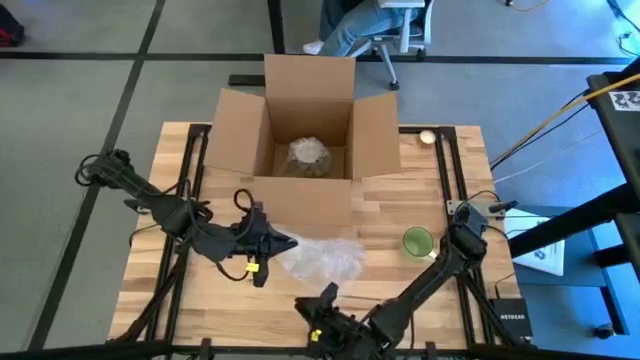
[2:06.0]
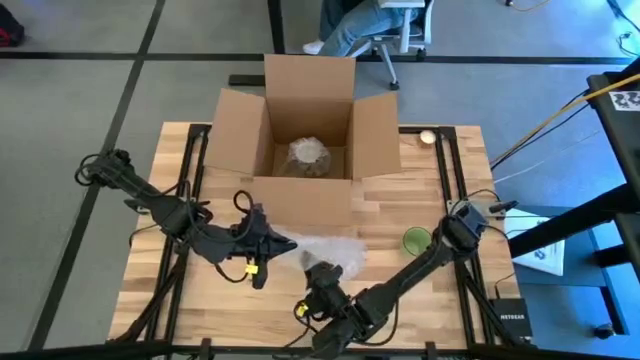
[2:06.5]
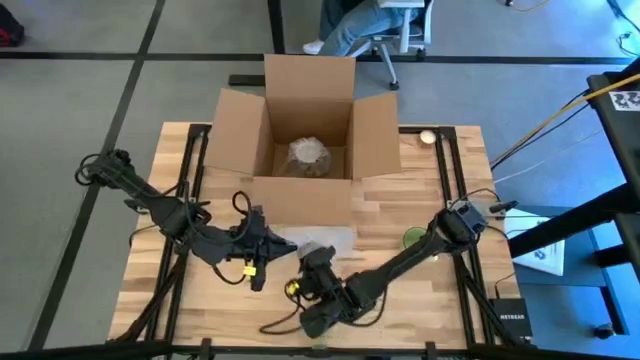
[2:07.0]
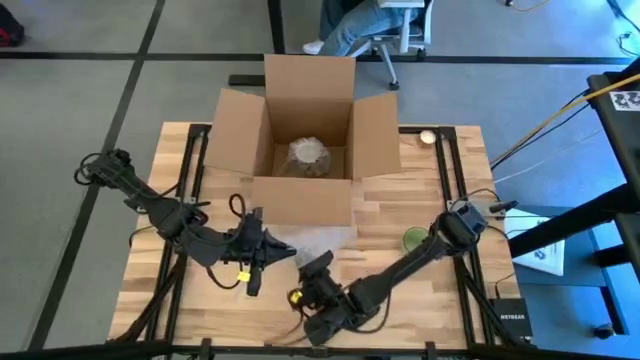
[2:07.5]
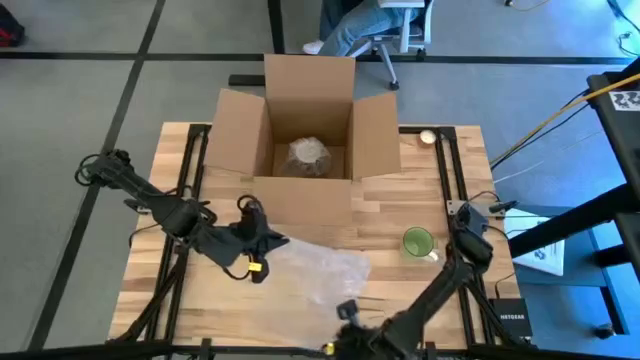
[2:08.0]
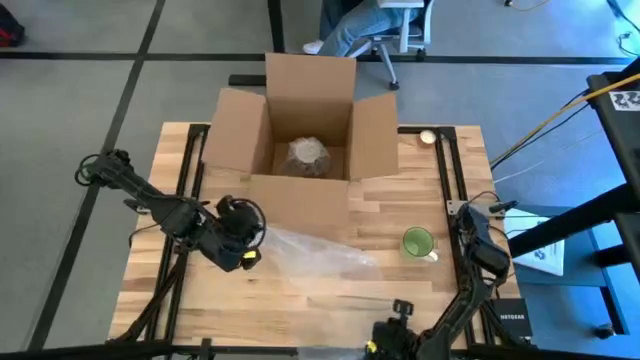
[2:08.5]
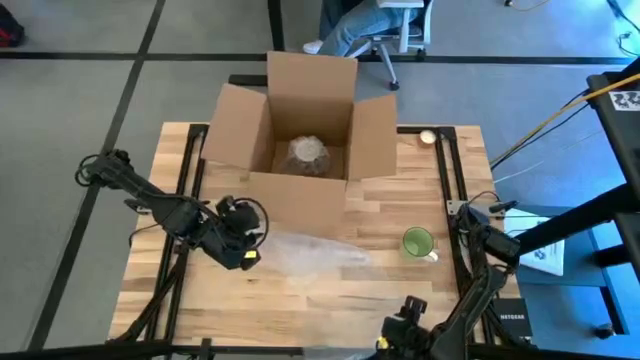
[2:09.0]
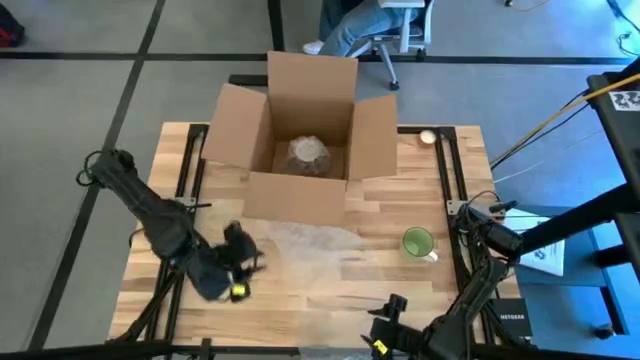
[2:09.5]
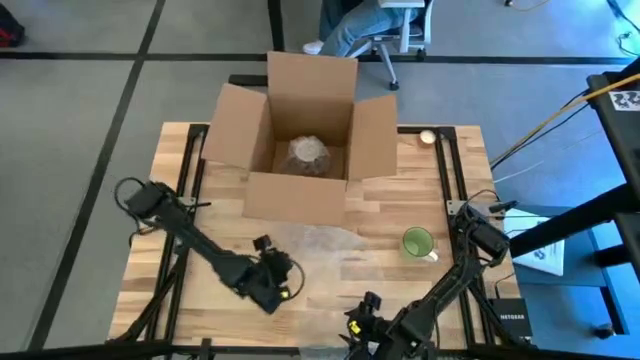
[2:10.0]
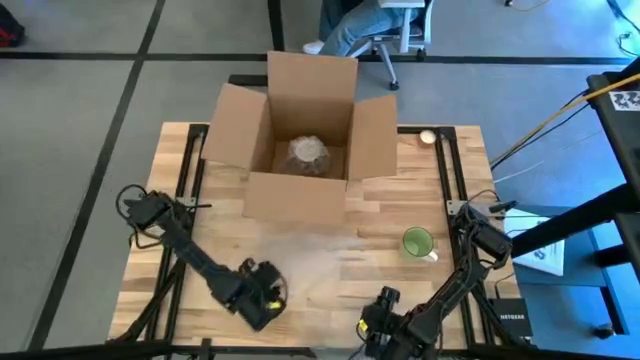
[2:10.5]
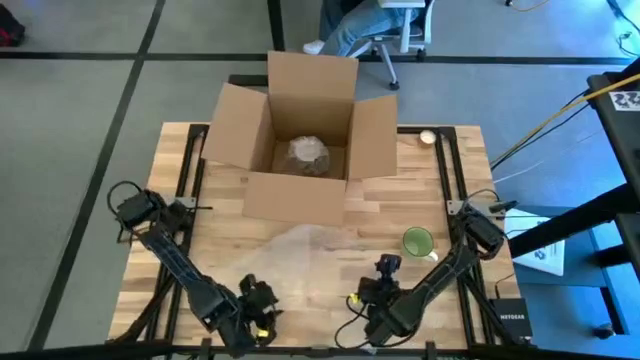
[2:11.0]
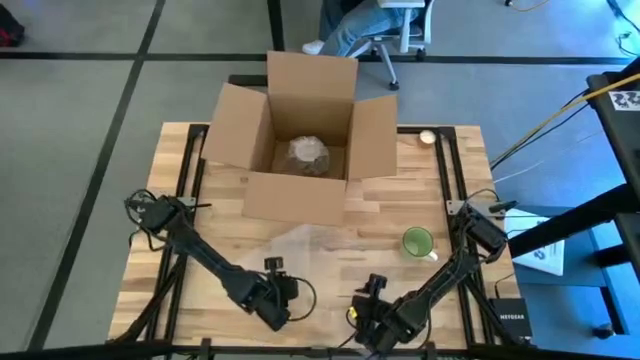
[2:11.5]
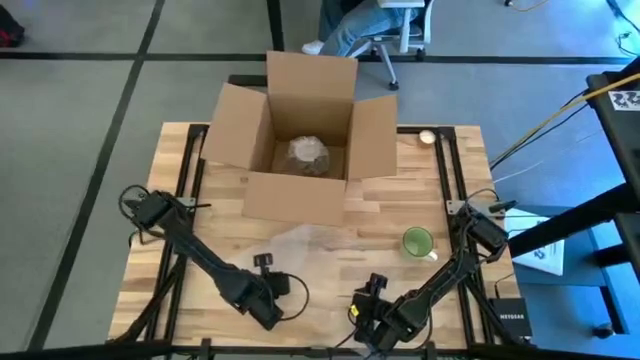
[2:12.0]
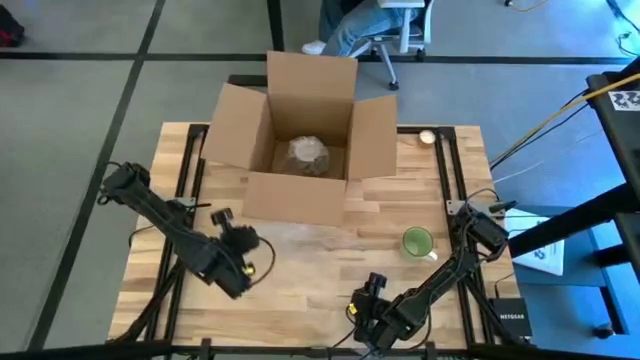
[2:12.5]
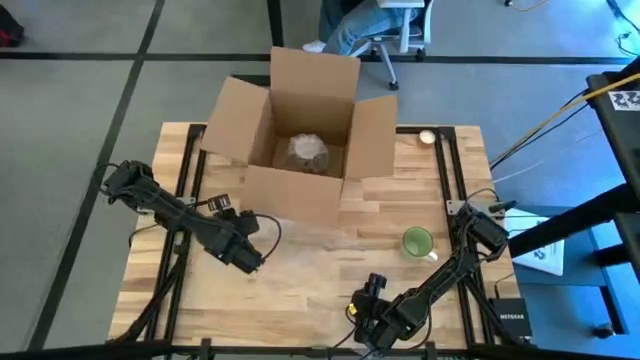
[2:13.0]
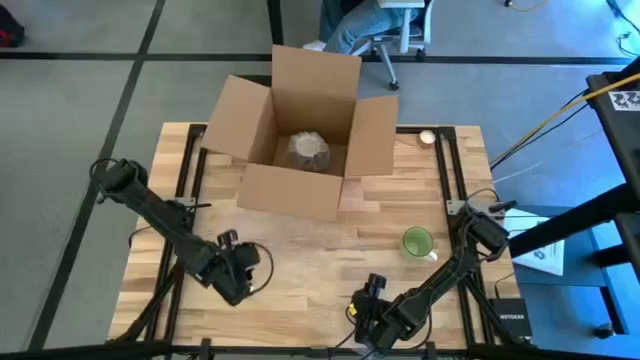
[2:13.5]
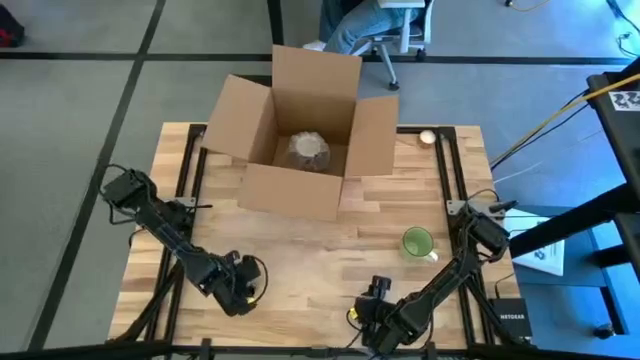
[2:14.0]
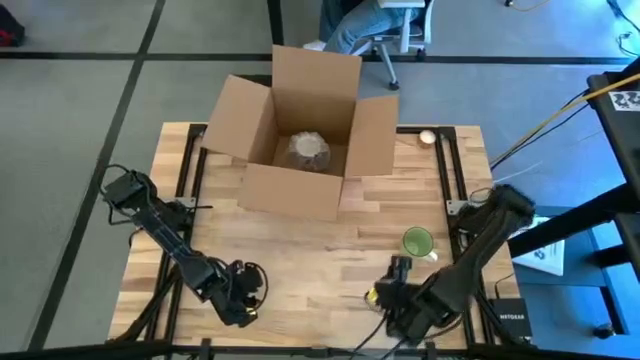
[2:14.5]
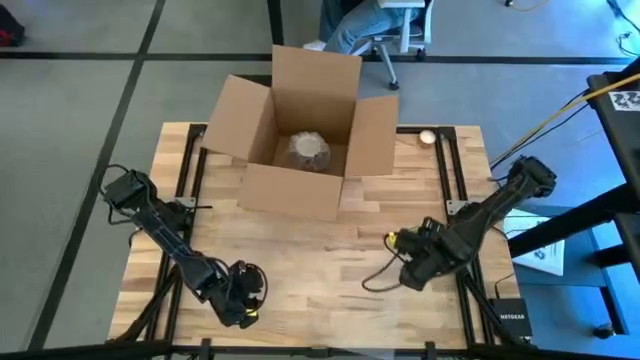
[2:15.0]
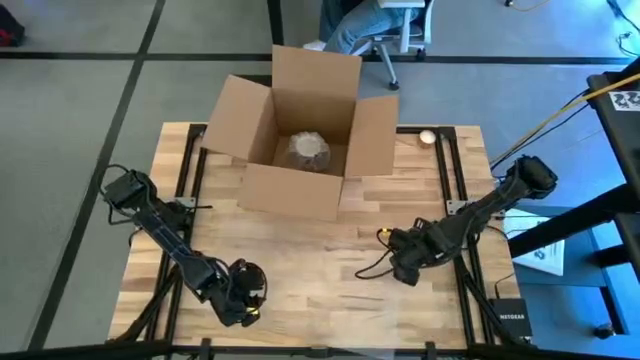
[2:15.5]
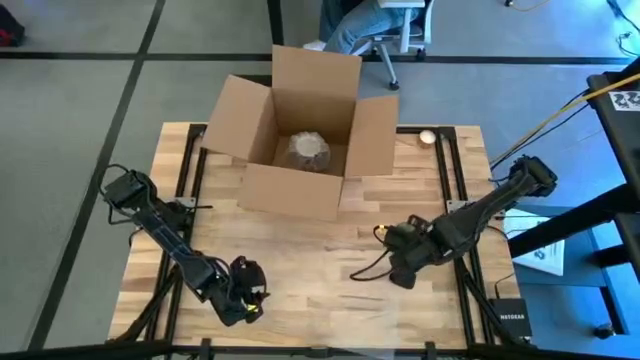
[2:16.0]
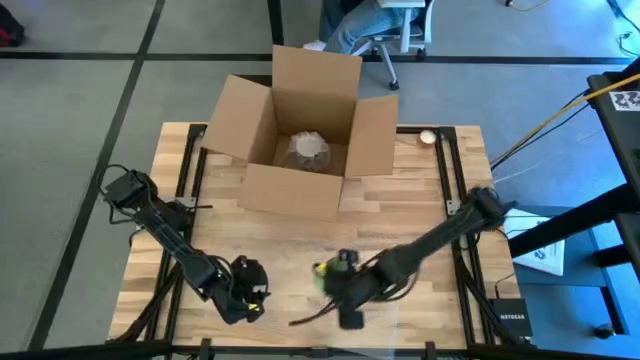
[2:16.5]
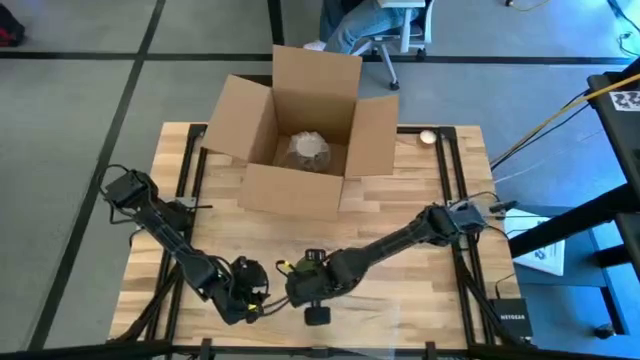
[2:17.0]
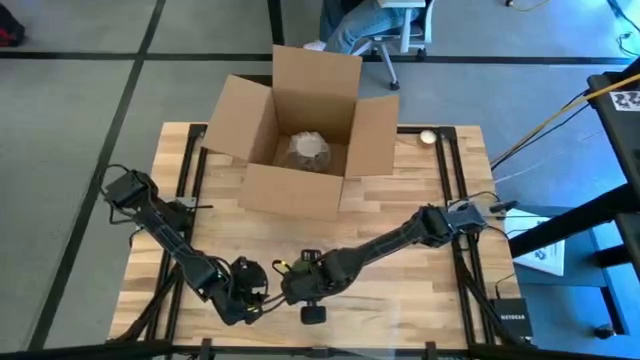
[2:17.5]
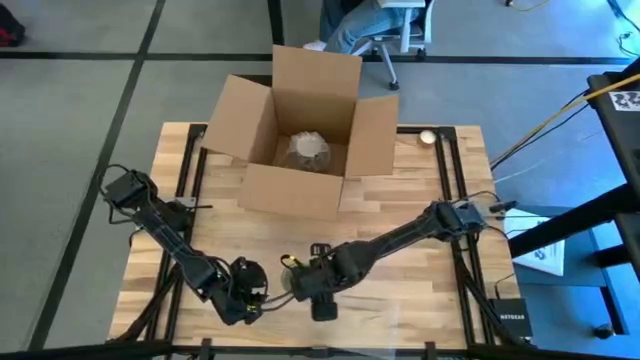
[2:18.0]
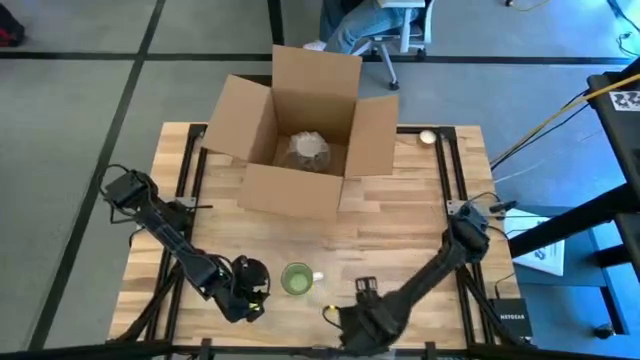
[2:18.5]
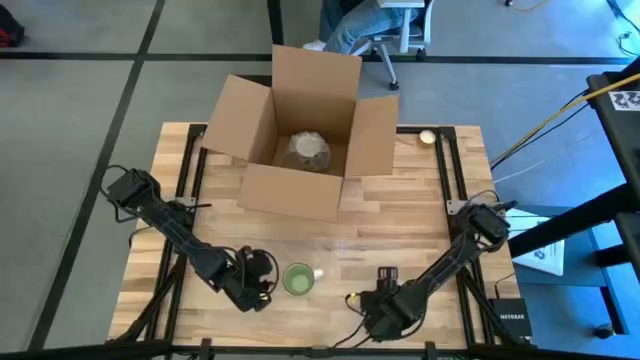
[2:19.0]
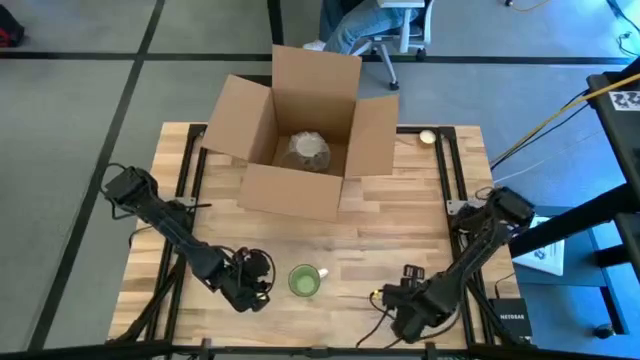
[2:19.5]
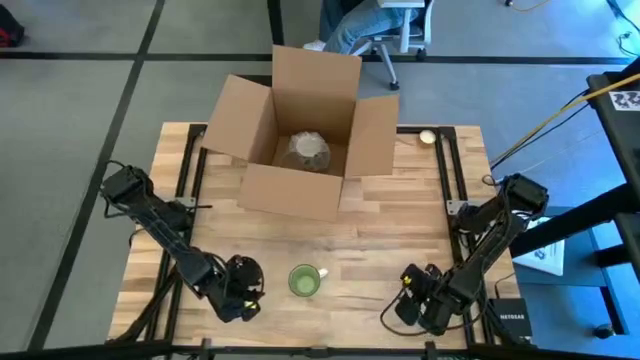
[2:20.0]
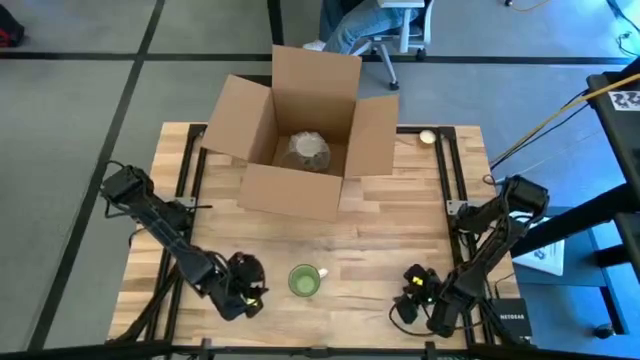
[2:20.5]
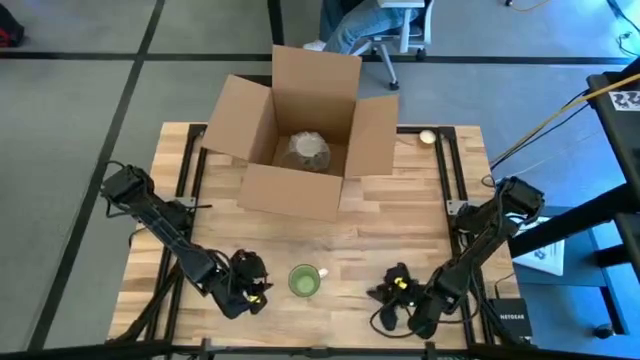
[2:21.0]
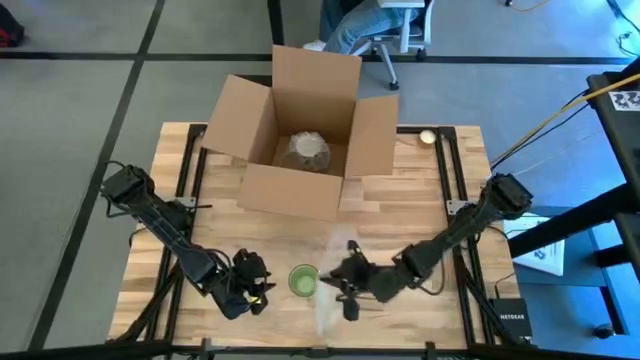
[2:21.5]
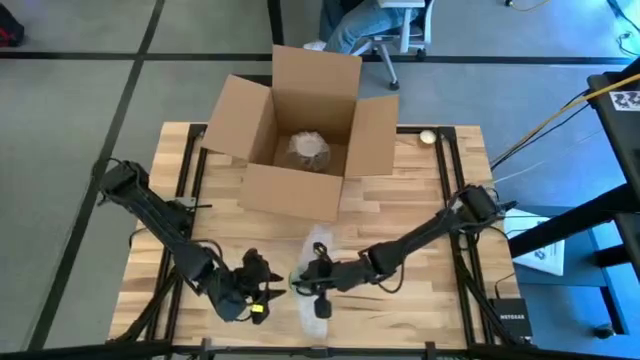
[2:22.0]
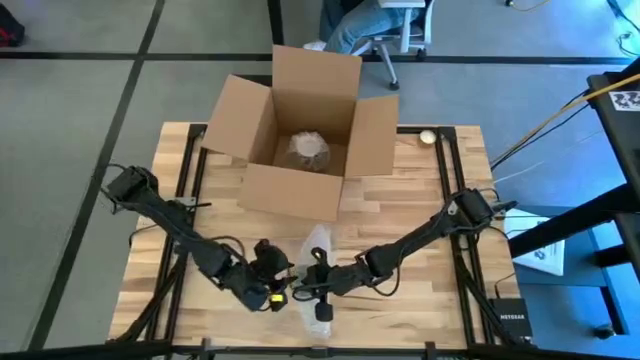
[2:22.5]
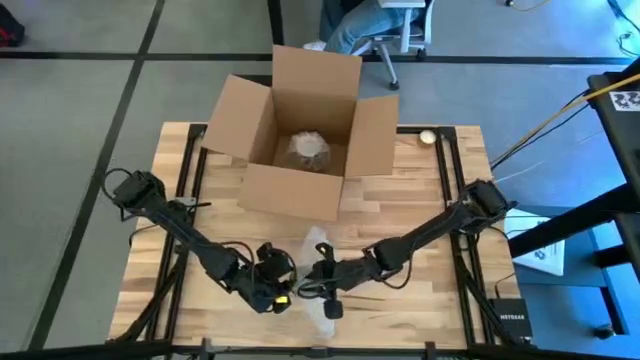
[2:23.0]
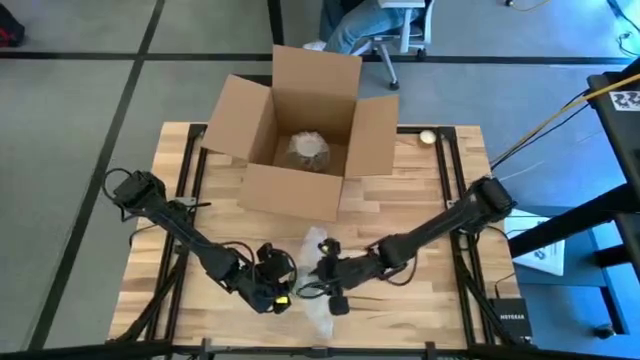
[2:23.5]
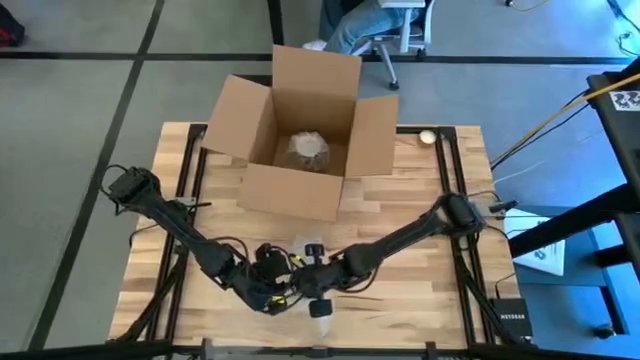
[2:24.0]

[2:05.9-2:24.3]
Task: wrap mug
Wrap the green mug with the transparent bubble wrap

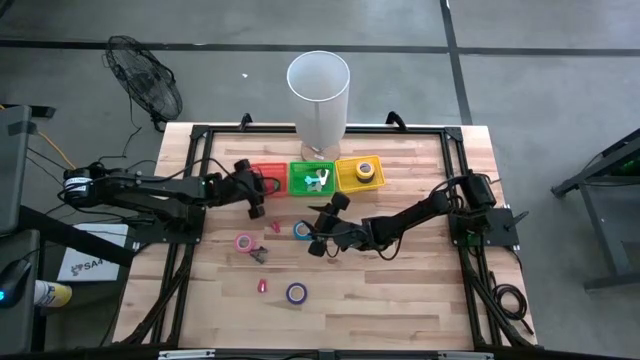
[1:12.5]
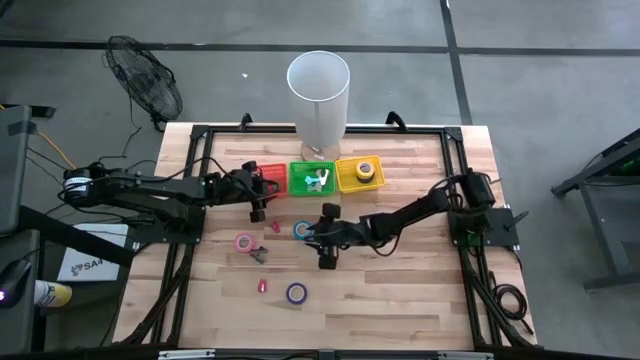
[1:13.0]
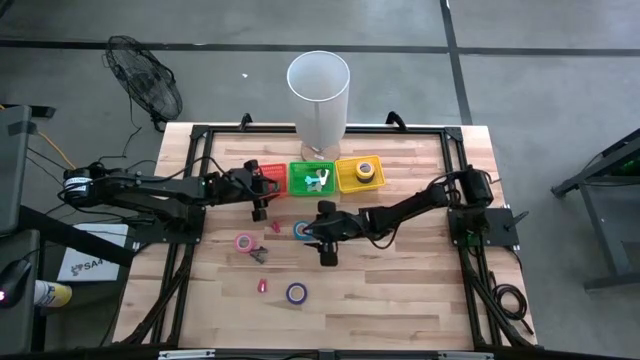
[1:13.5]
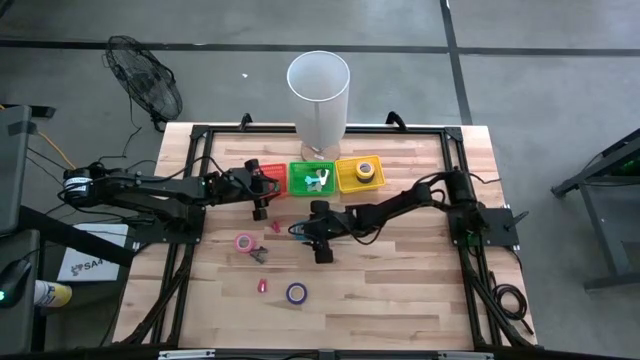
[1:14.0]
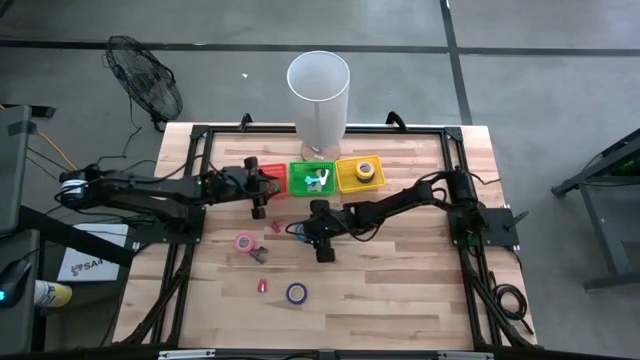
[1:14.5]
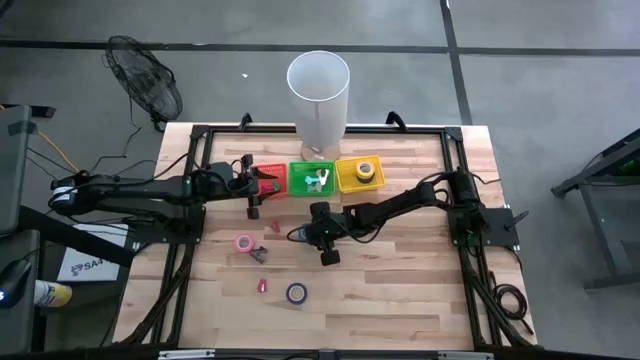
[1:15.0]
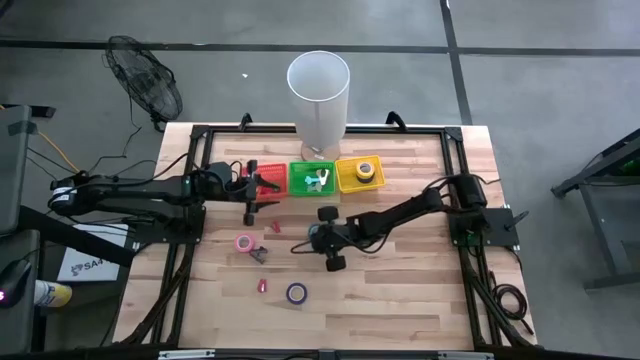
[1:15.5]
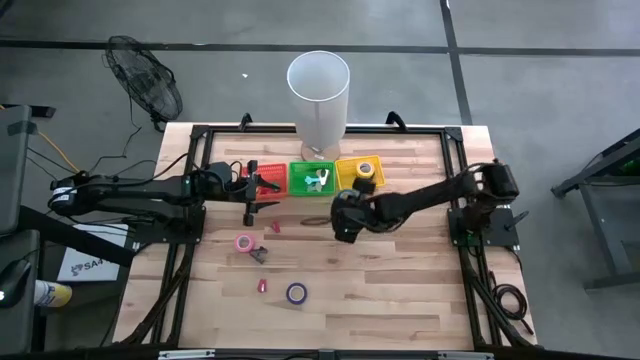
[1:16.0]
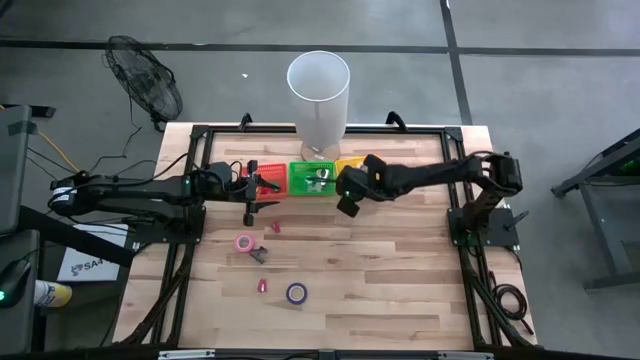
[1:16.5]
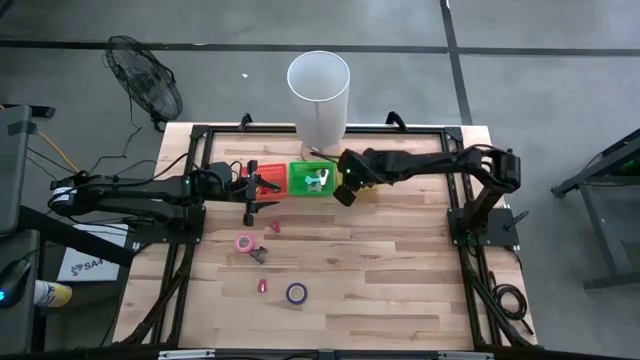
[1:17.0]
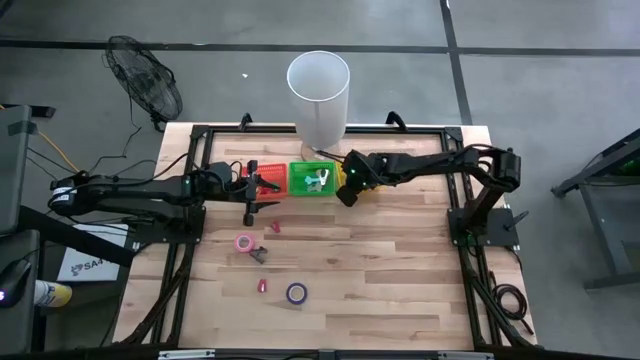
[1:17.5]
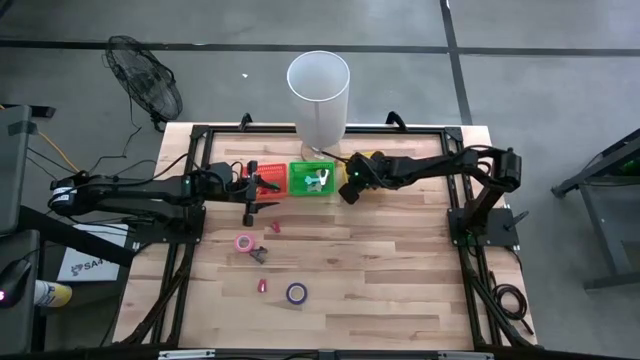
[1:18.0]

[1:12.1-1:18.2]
Task: Pick and place Stapler, Stapler remover, tape
Put the light blue tape into the yellow bin
